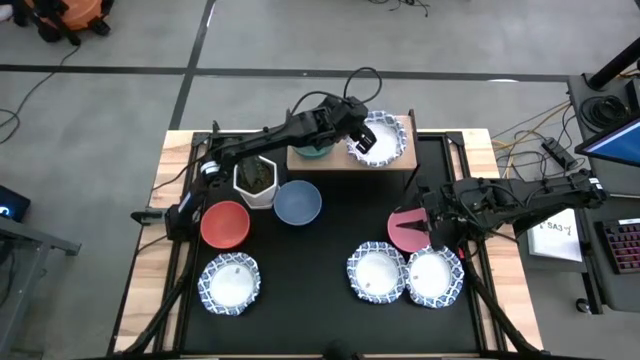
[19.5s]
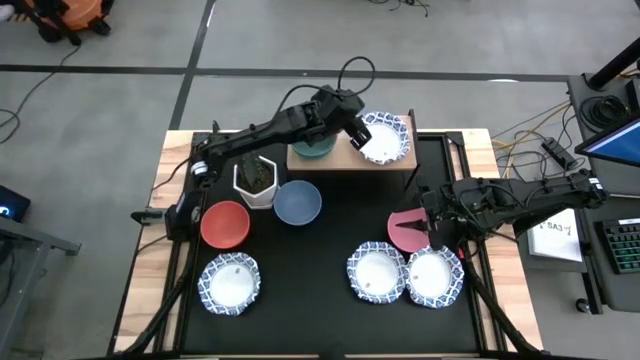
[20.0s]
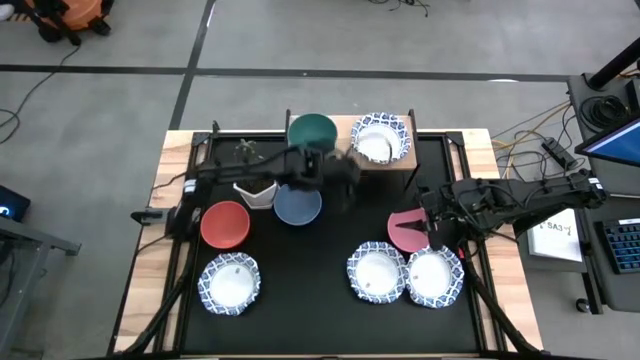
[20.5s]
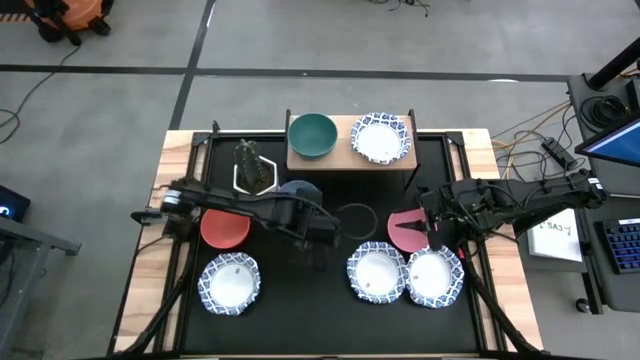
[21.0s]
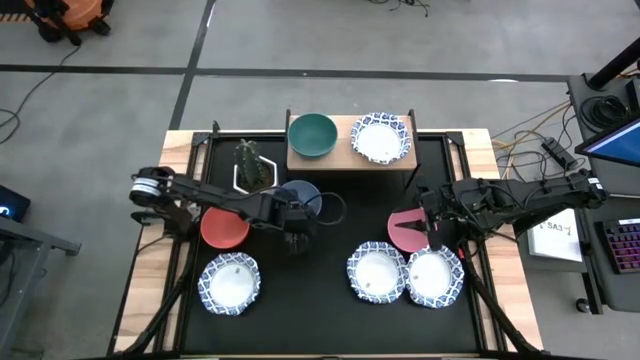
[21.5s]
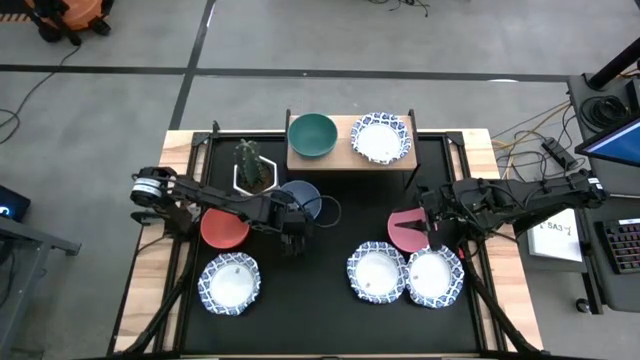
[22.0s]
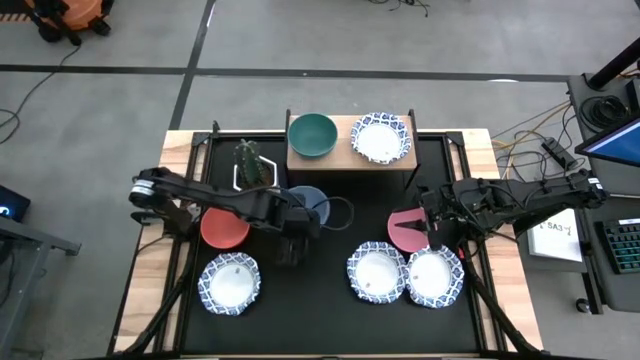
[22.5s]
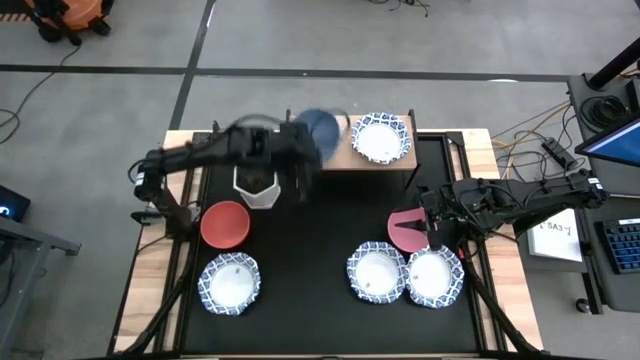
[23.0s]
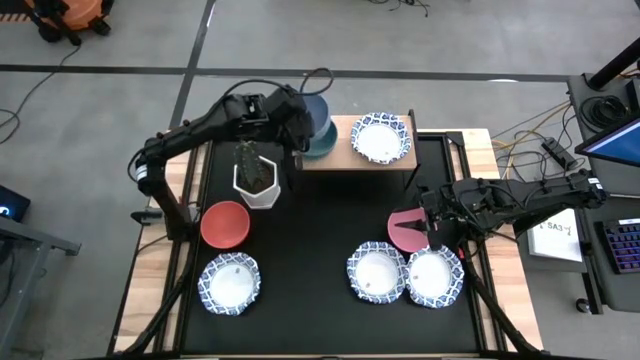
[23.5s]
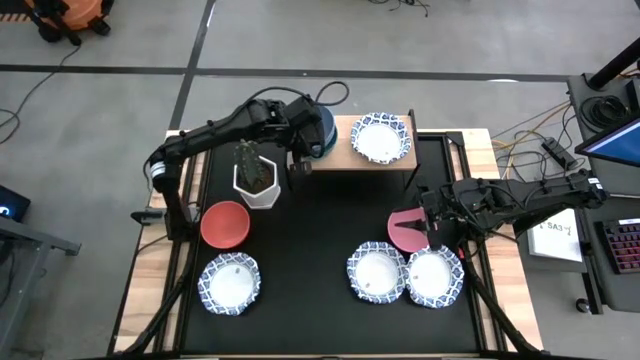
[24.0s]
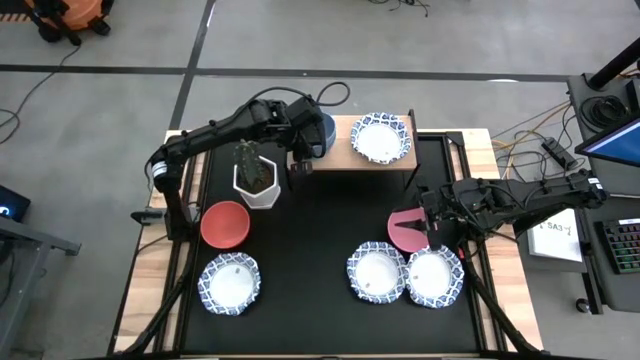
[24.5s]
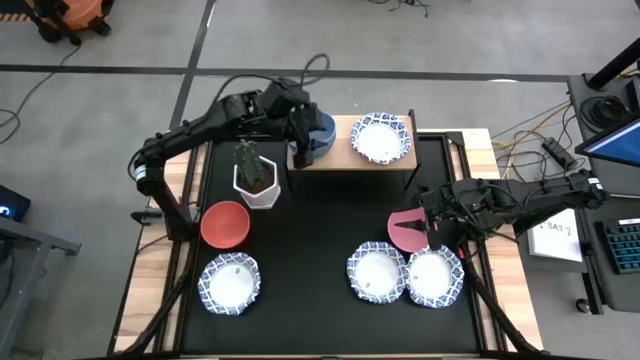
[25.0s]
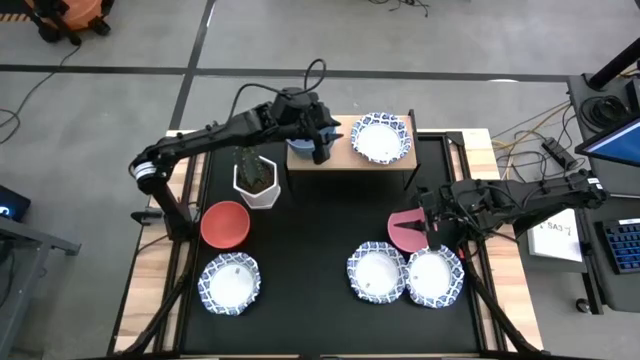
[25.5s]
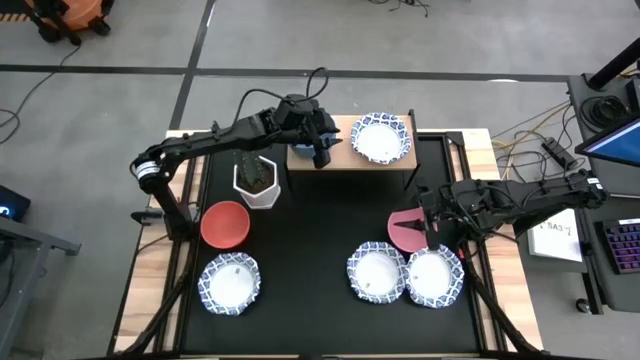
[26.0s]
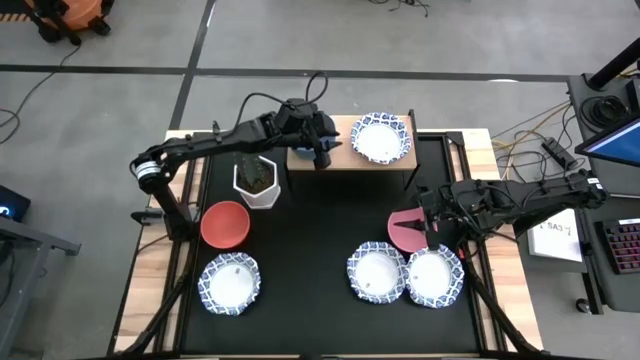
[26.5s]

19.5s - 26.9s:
Task: Place and stack bowls onto a shelf
Stack the blue bowl on top of the green bowl on the shelf

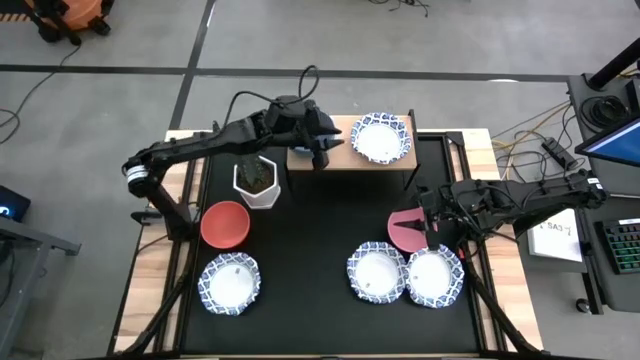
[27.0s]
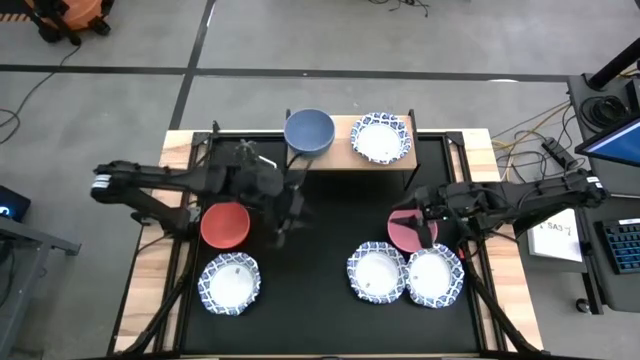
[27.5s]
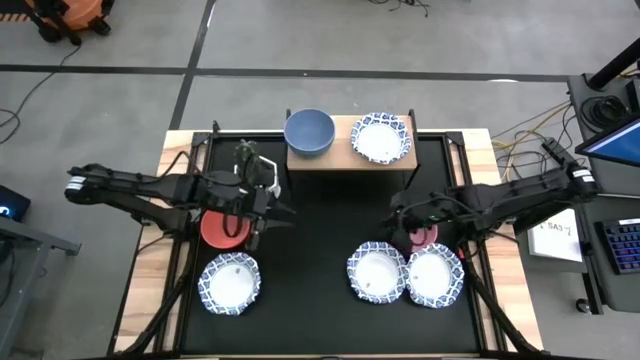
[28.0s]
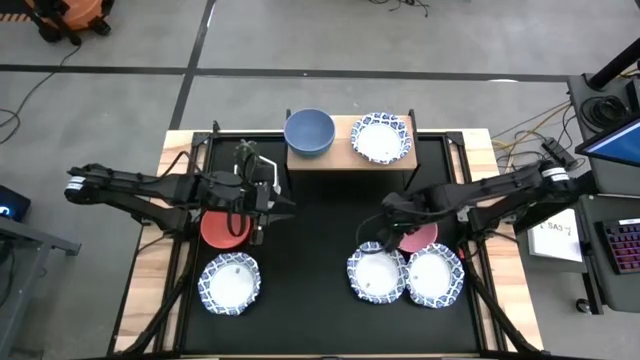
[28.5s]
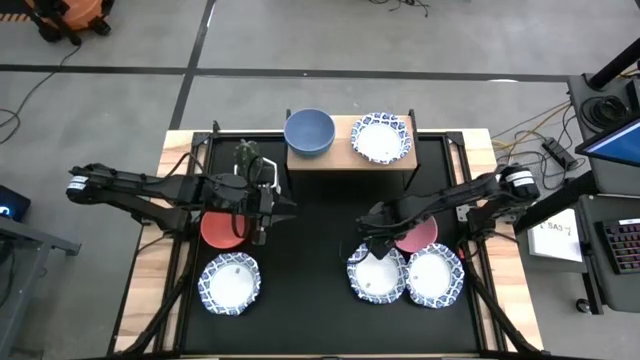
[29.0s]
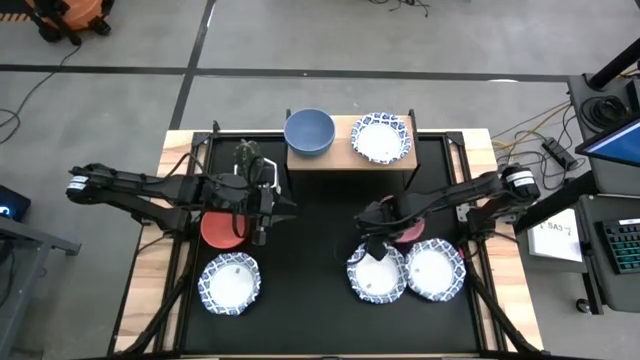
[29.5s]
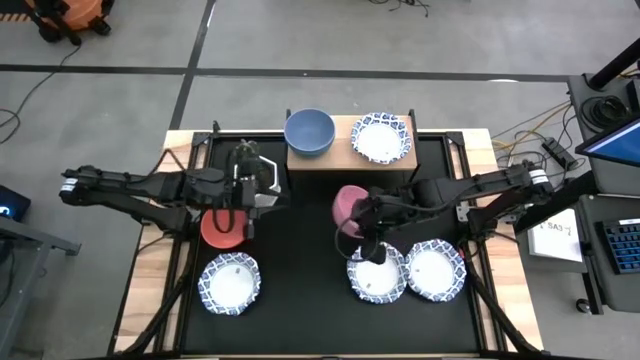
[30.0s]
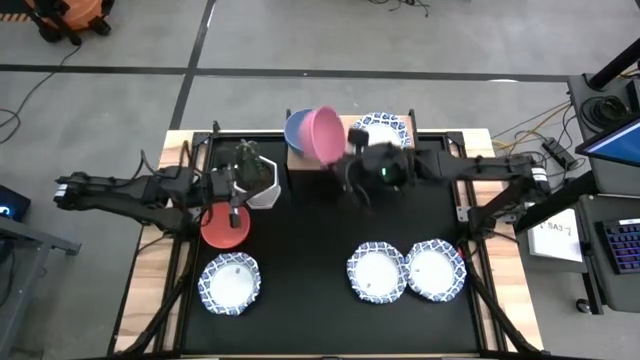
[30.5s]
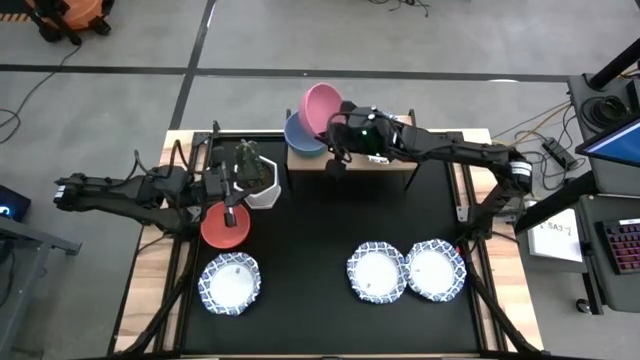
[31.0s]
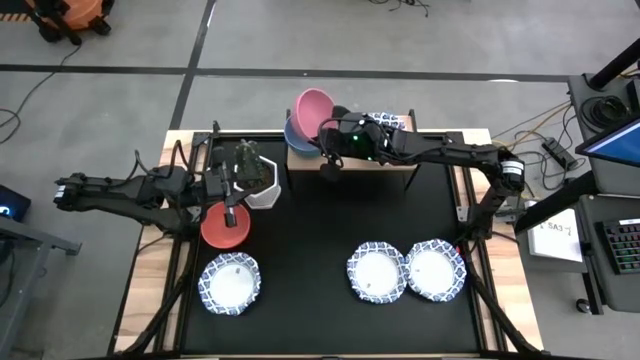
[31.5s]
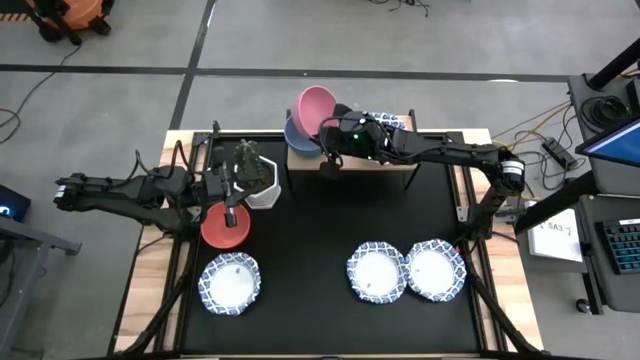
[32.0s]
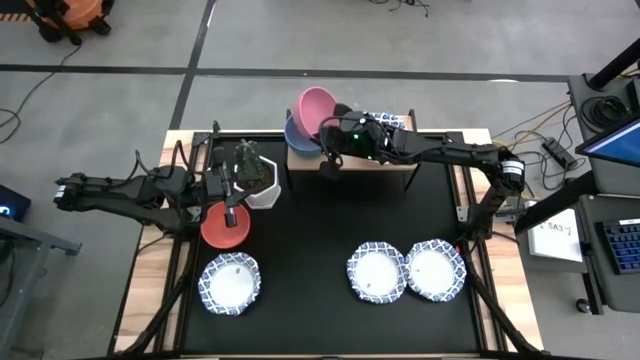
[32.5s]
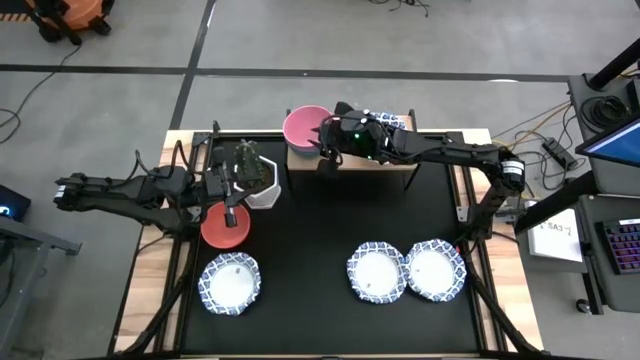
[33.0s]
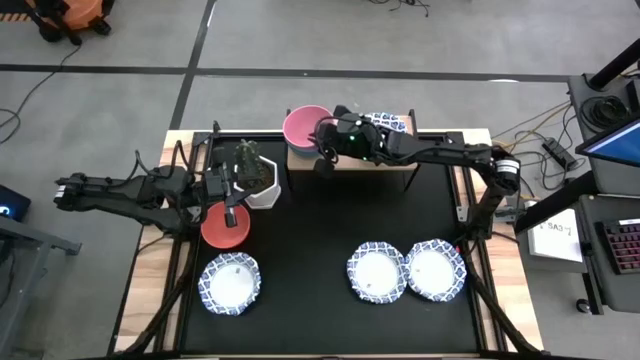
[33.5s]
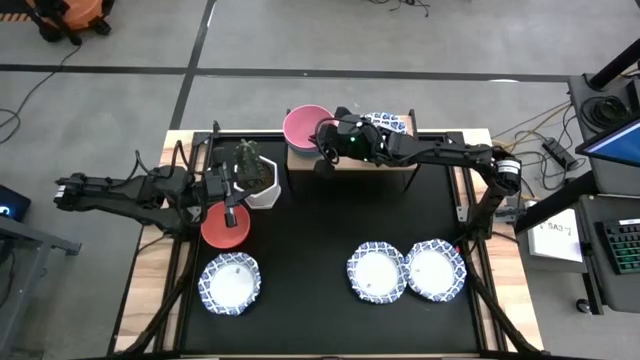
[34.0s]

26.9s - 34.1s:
Stack the pink bowl on top of the blue bowls on the shelf

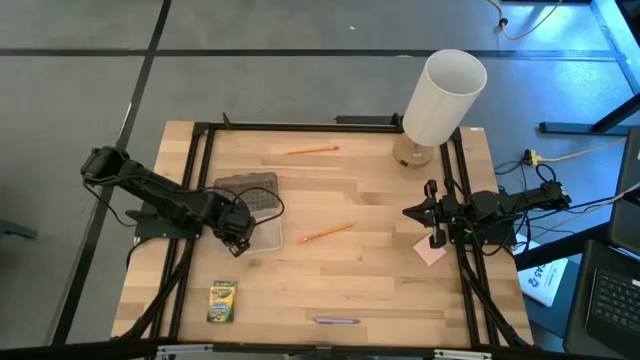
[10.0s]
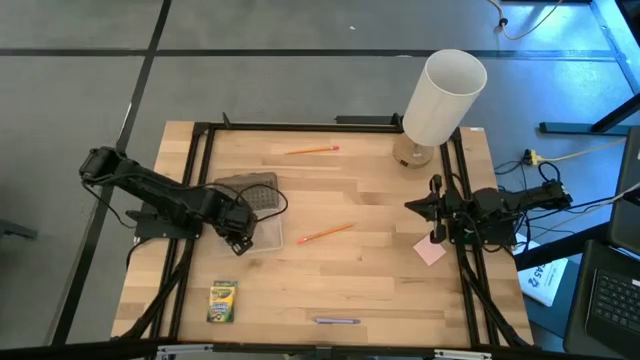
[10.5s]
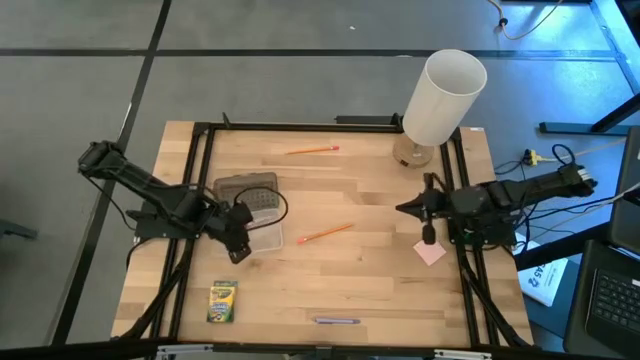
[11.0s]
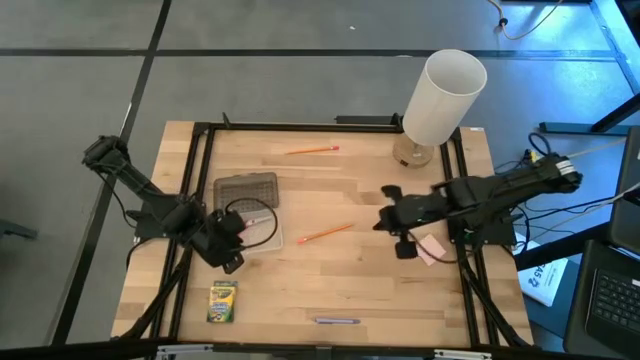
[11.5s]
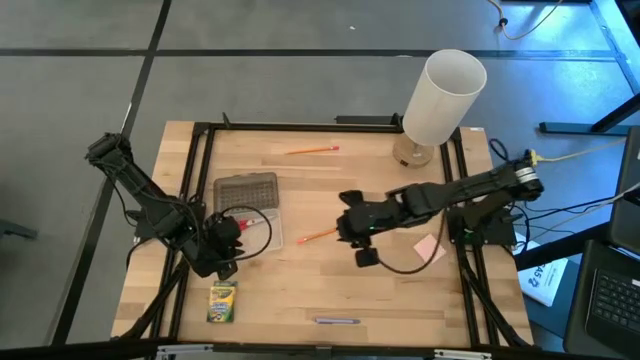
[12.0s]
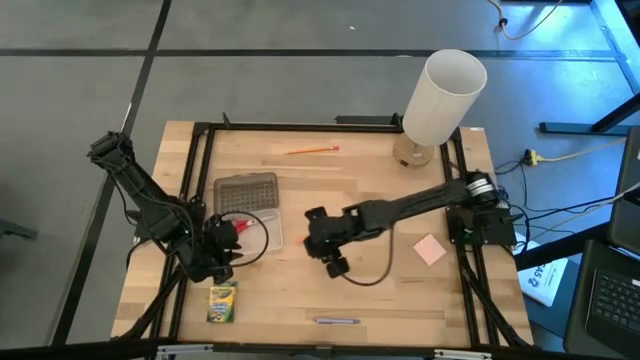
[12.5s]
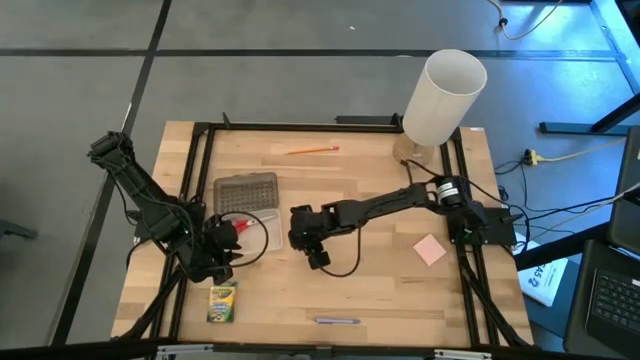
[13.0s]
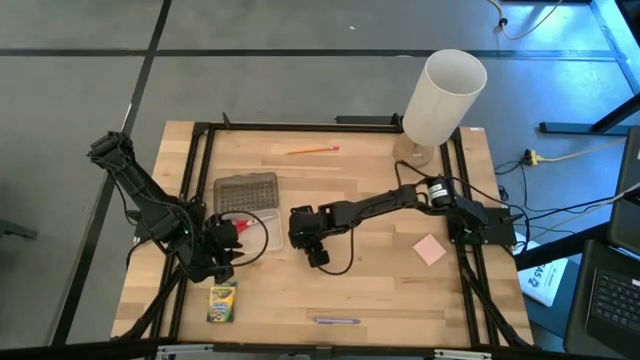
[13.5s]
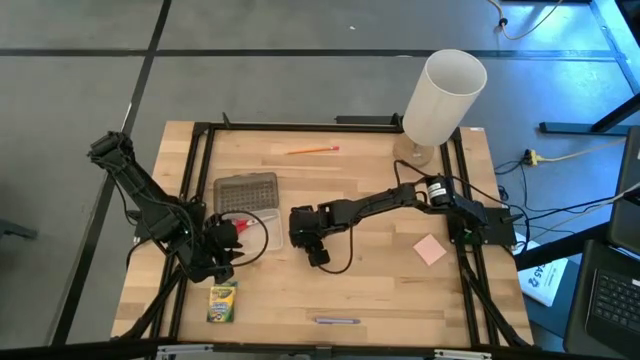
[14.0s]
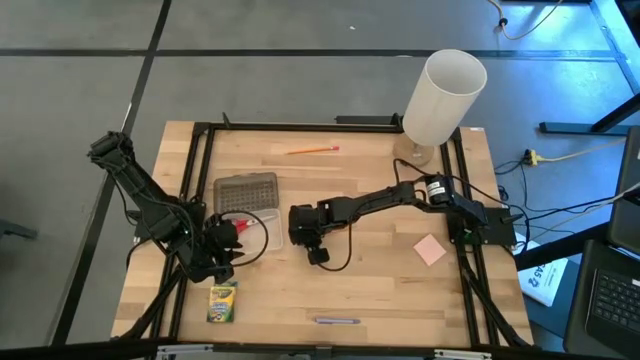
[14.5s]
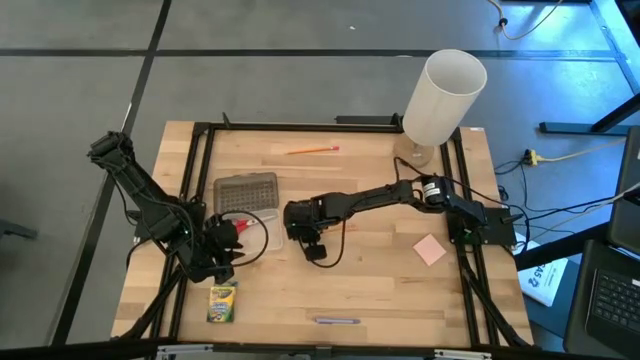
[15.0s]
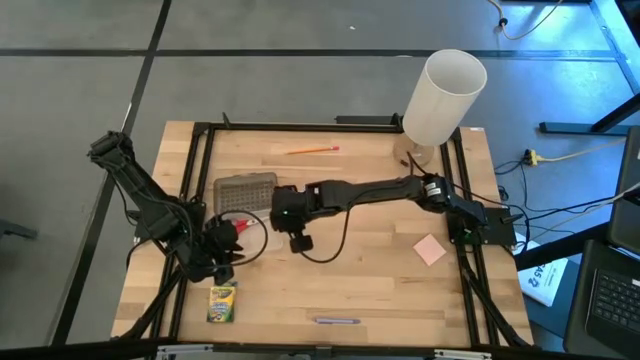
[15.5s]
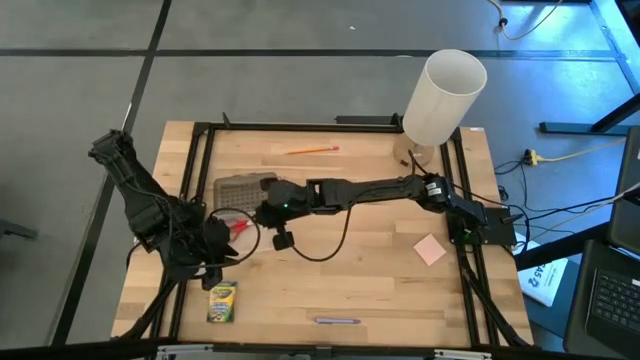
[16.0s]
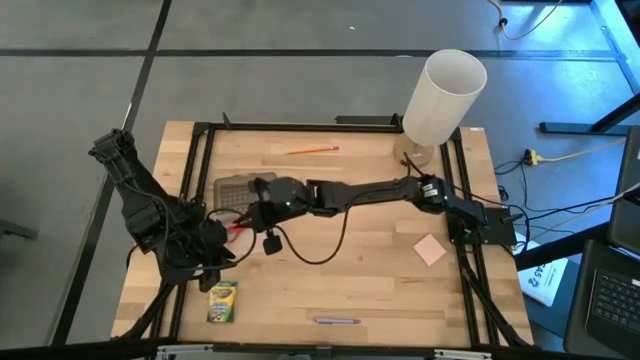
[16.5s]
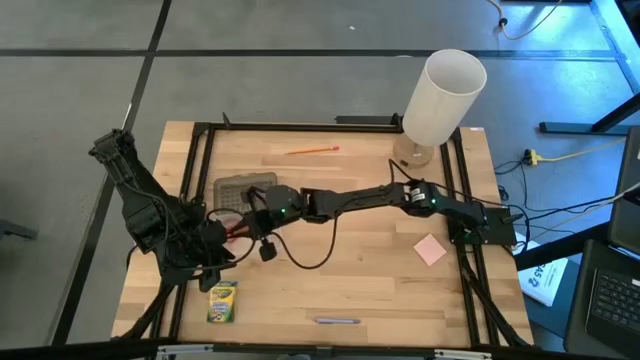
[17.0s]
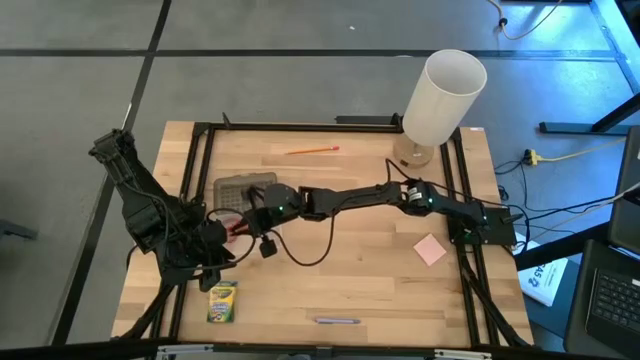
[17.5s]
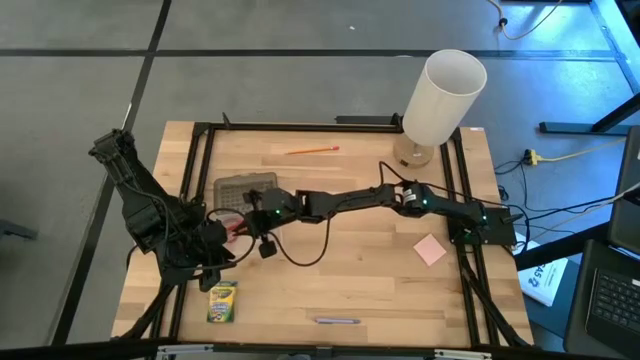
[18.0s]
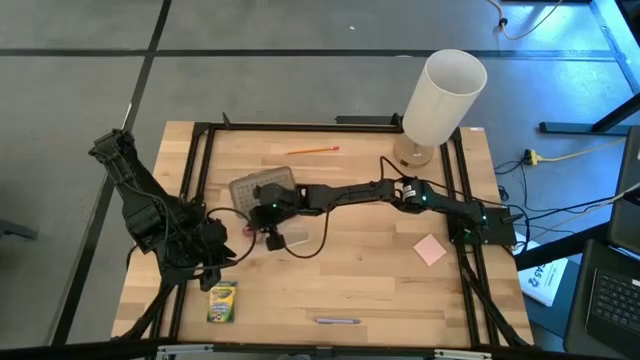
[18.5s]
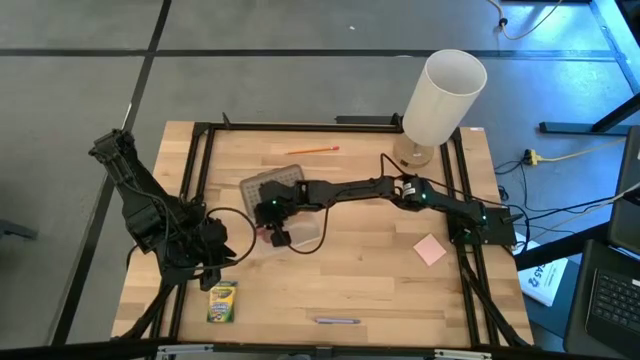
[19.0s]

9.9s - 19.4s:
Task: Pack school essentials
Put the orange pencil into the transparent supply box
